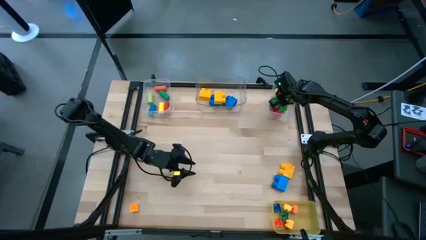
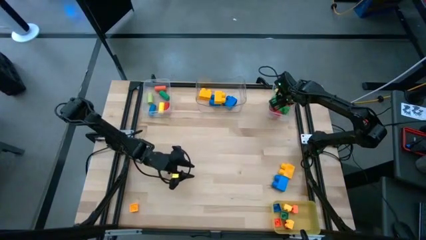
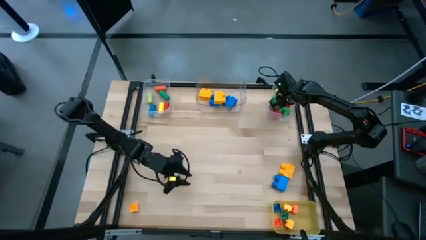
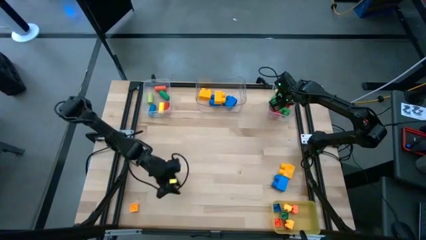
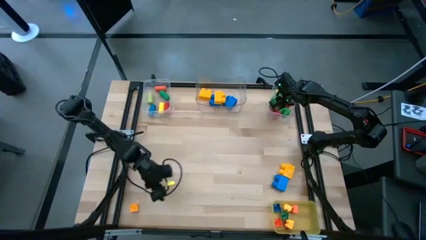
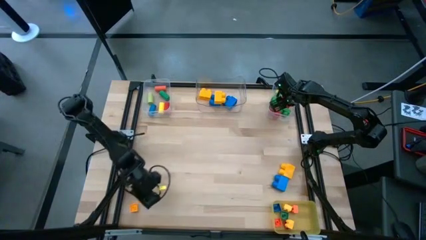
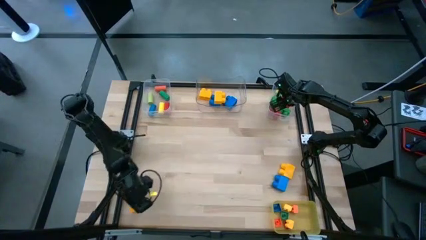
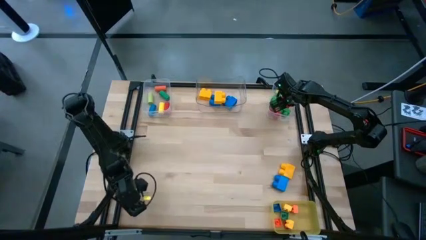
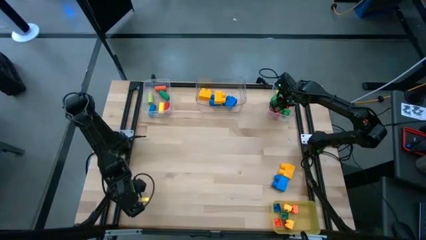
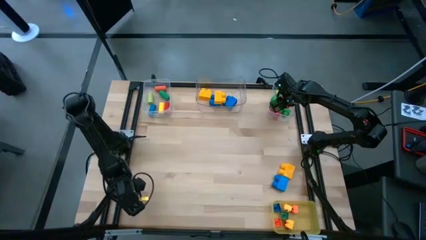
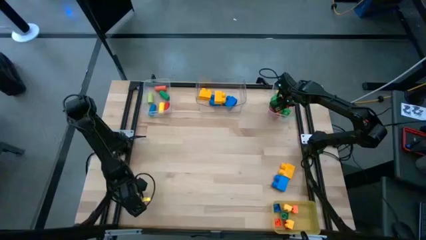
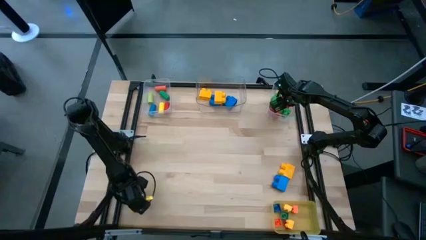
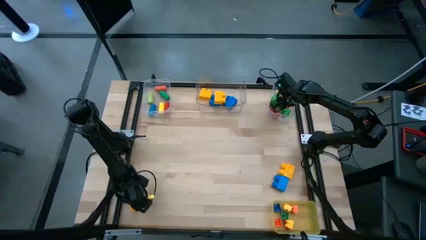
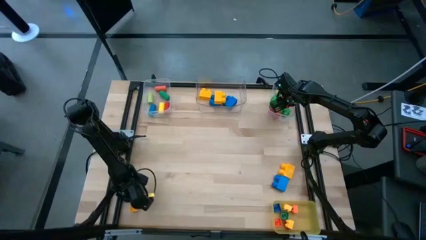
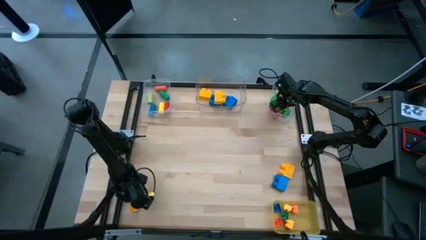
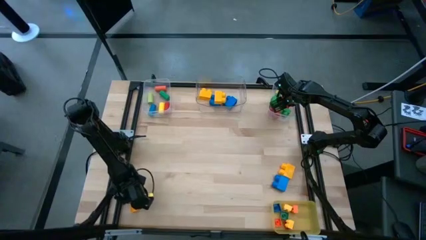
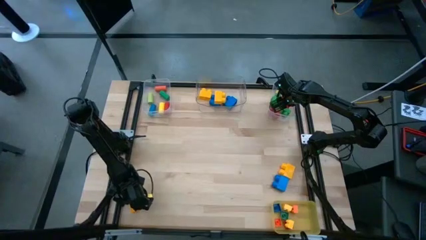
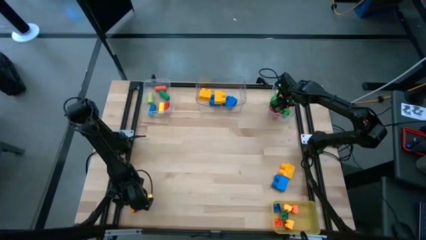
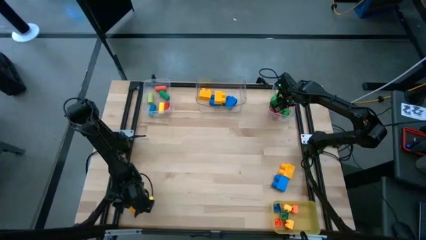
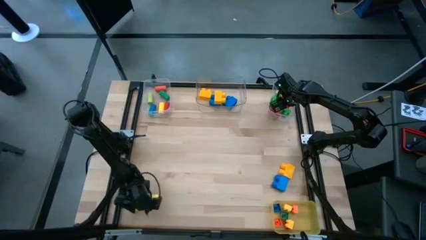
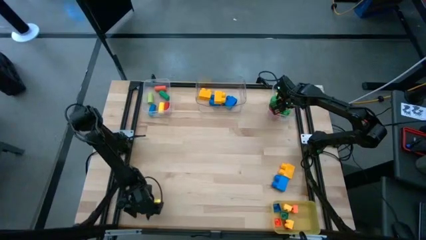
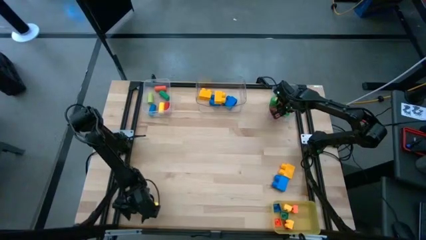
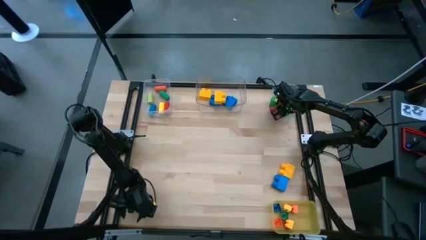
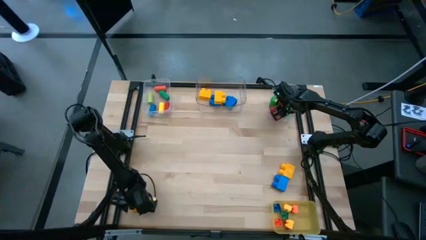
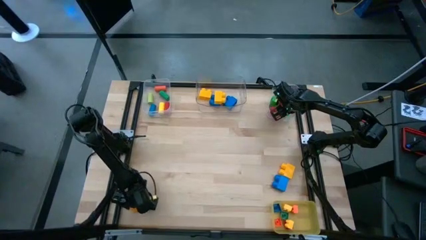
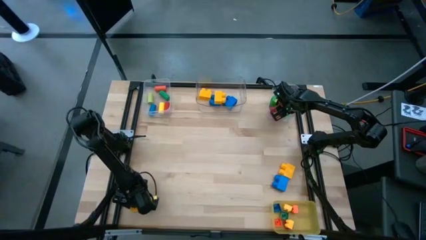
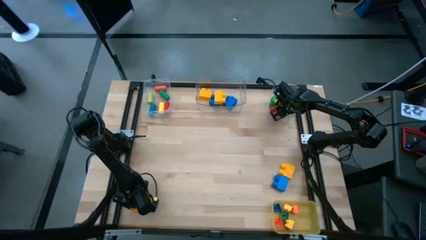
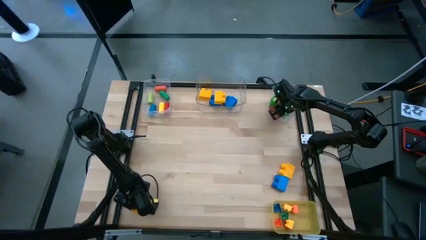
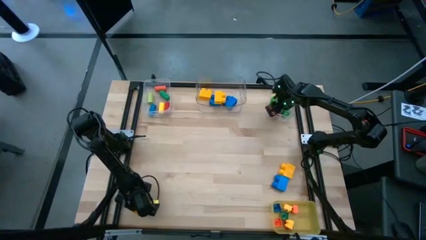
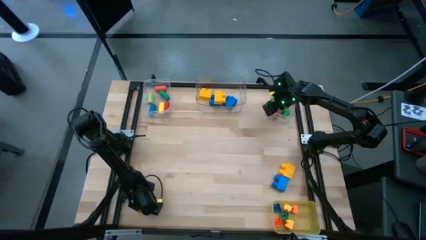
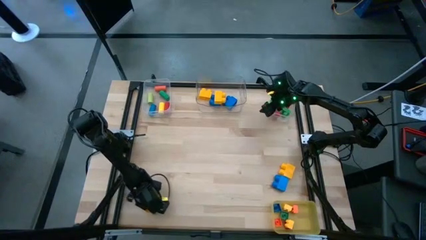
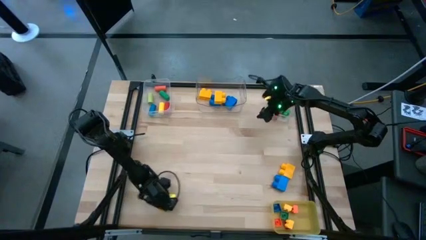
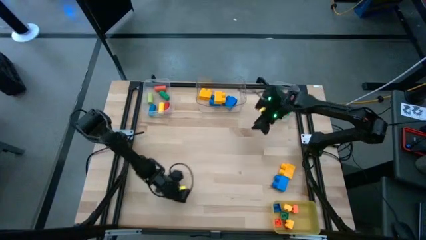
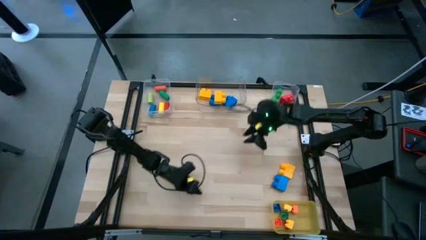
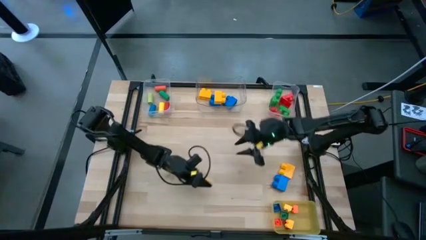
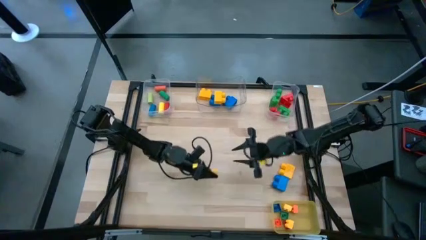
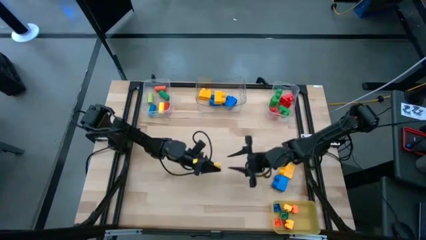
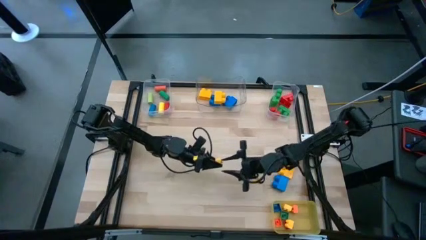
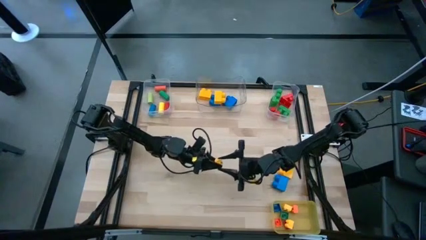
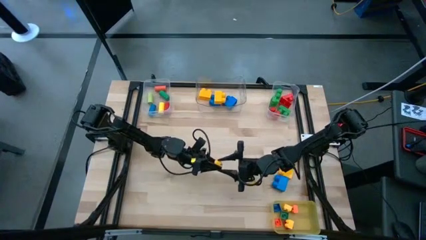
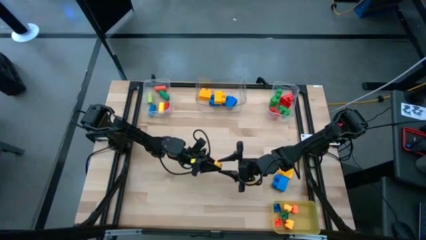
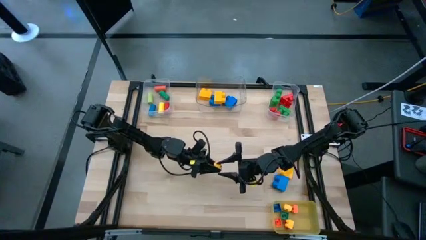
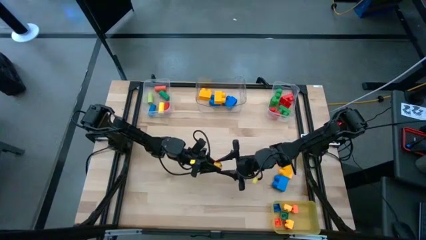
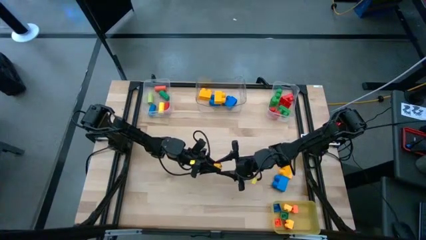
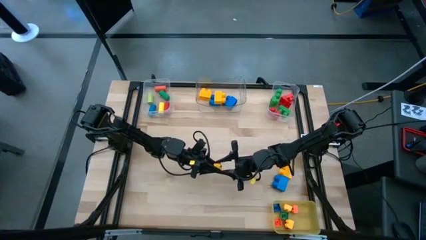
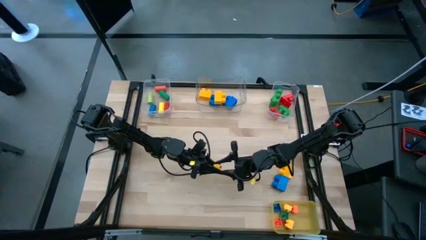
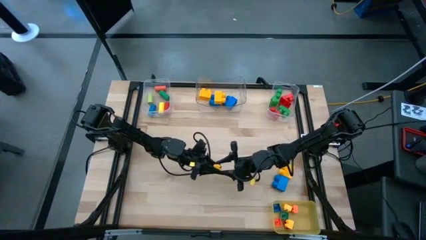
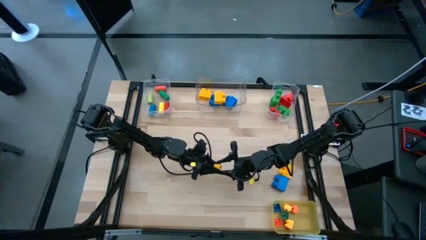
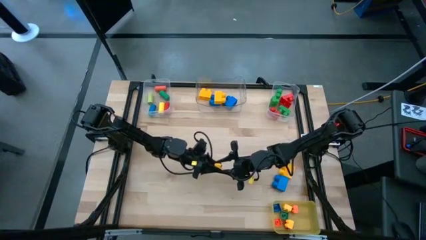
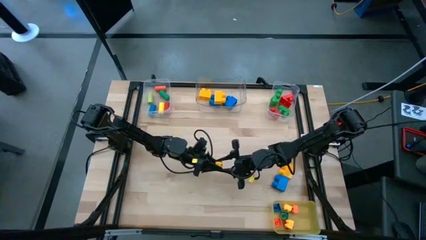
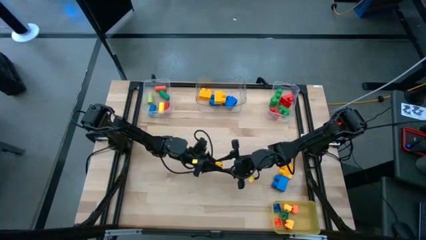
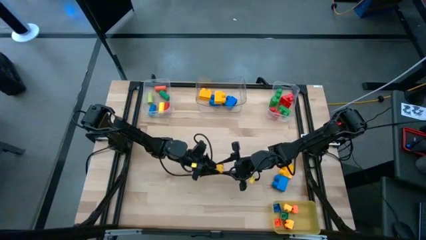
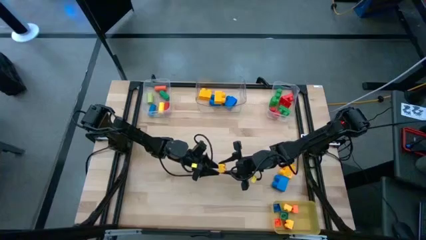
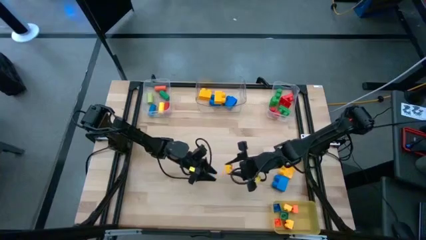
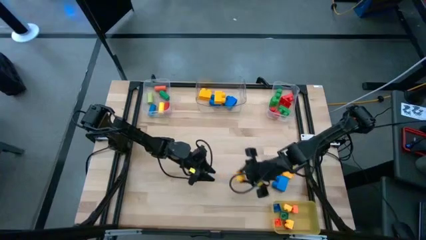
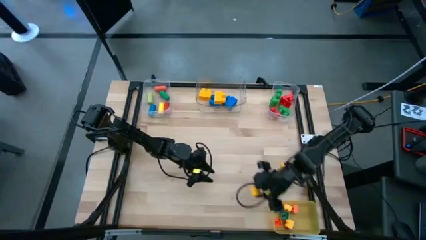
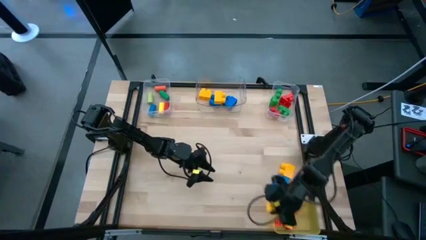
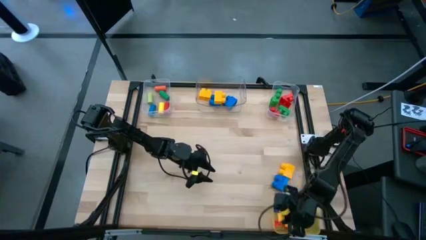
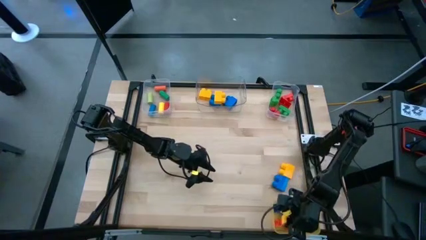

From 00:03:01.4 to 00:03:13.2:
Task: Sort blocks by size
Put the small yellow game piece into the yellow bin
